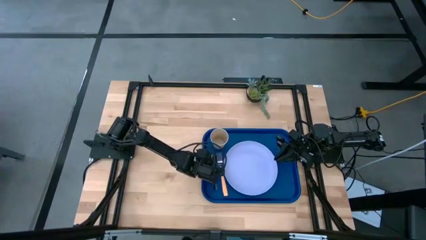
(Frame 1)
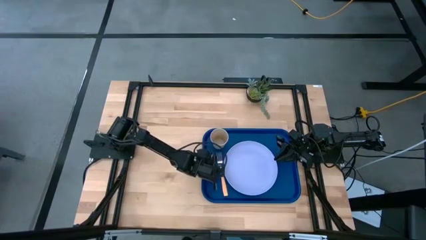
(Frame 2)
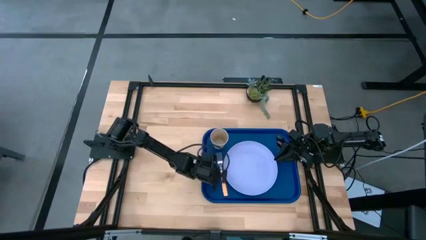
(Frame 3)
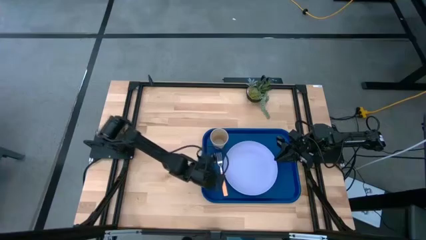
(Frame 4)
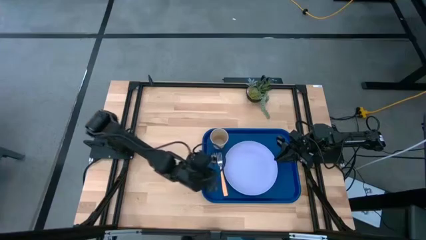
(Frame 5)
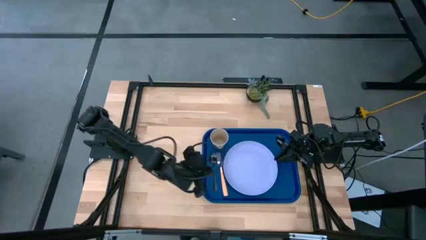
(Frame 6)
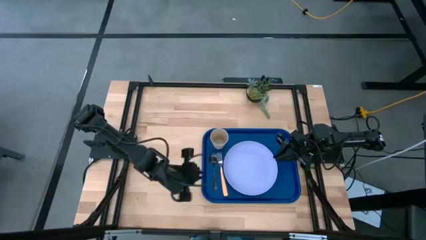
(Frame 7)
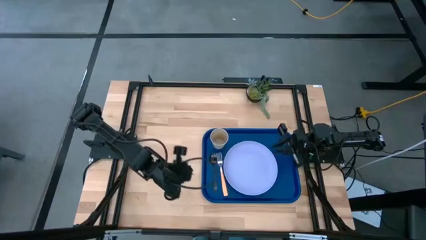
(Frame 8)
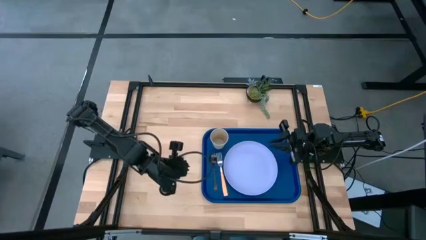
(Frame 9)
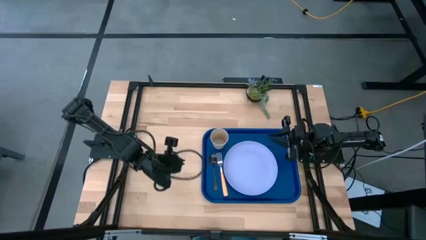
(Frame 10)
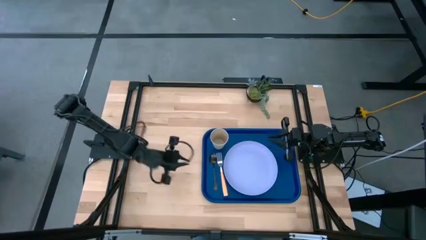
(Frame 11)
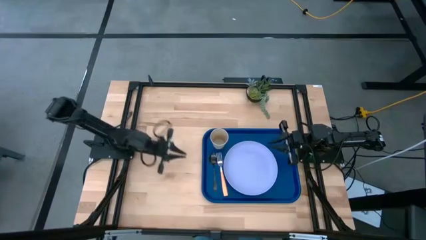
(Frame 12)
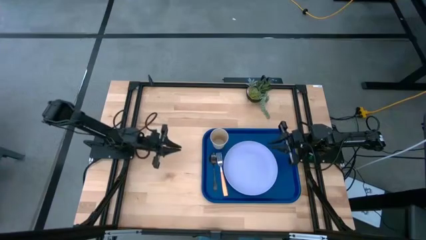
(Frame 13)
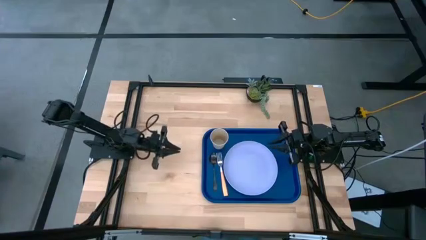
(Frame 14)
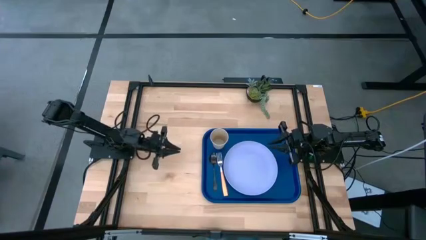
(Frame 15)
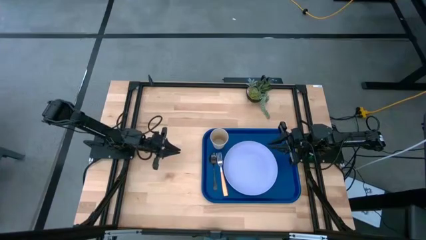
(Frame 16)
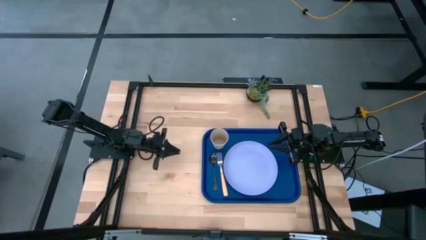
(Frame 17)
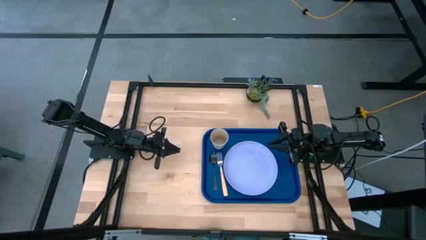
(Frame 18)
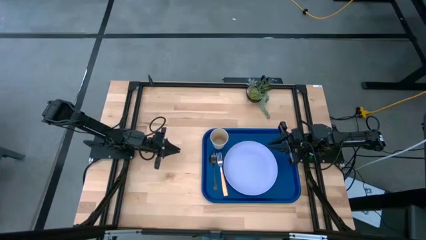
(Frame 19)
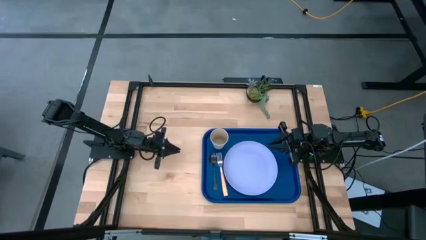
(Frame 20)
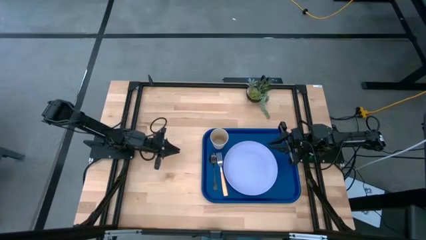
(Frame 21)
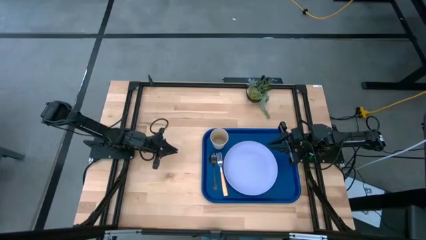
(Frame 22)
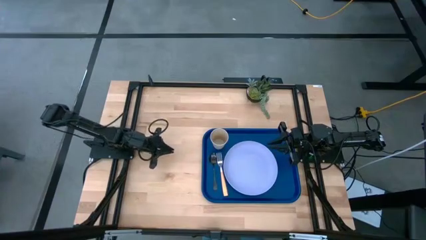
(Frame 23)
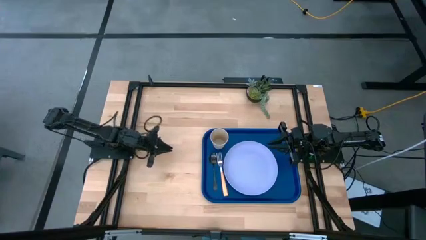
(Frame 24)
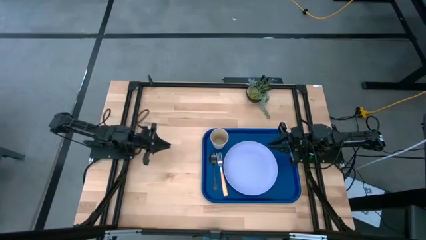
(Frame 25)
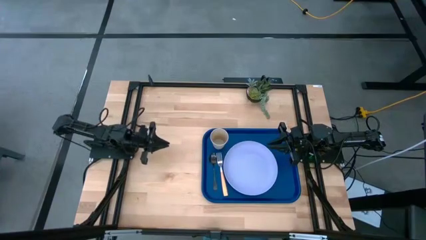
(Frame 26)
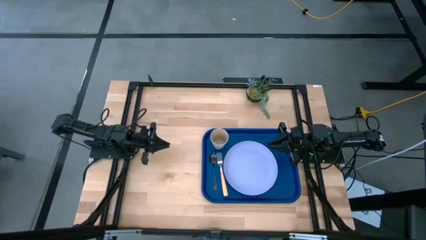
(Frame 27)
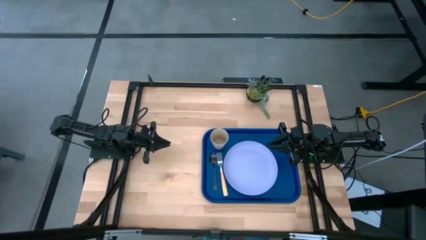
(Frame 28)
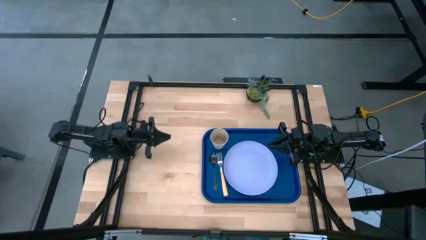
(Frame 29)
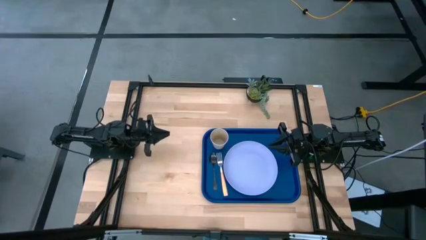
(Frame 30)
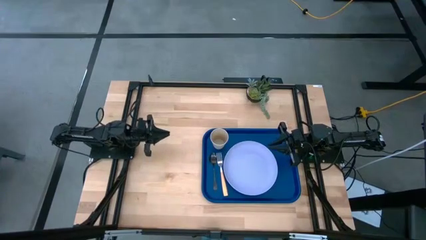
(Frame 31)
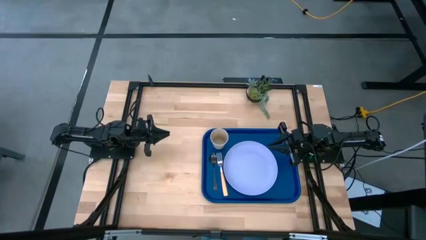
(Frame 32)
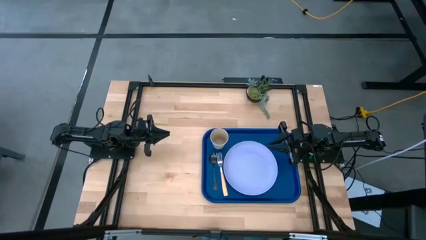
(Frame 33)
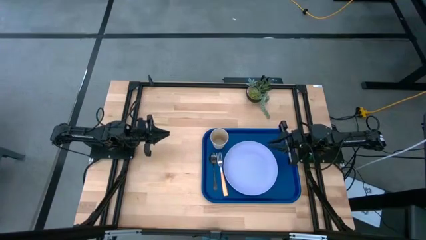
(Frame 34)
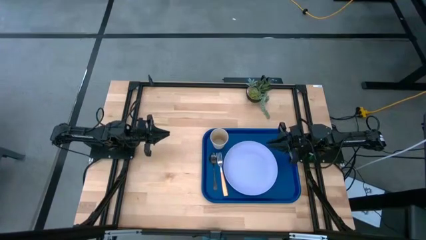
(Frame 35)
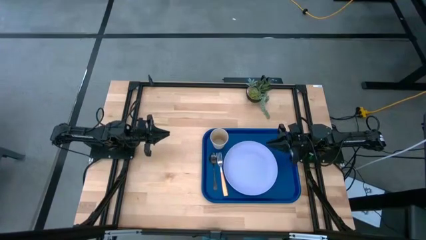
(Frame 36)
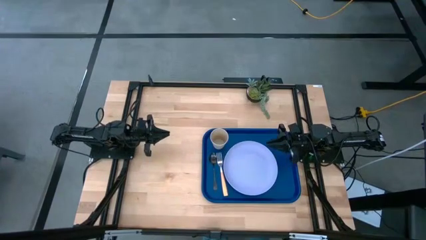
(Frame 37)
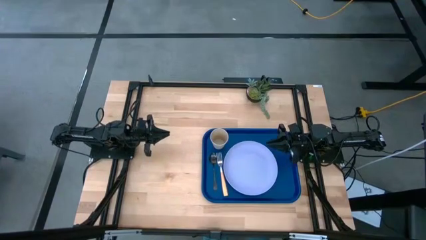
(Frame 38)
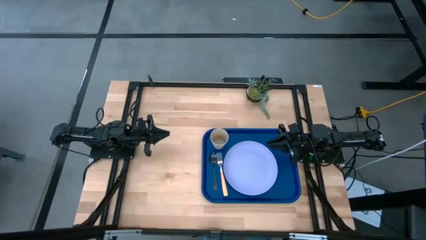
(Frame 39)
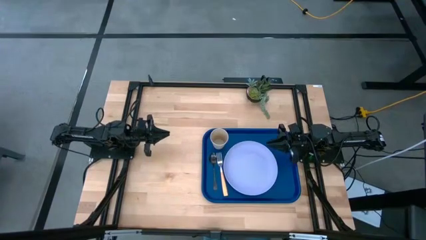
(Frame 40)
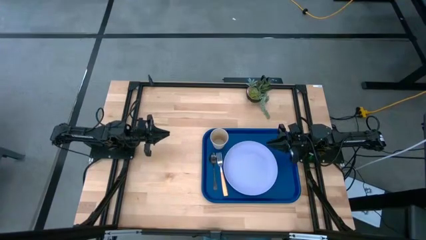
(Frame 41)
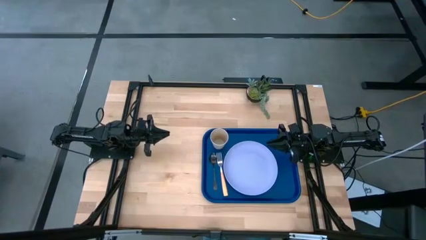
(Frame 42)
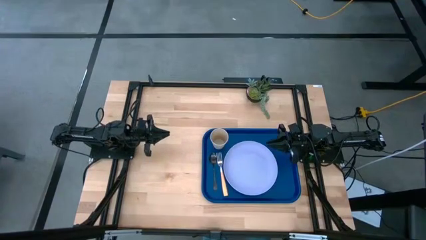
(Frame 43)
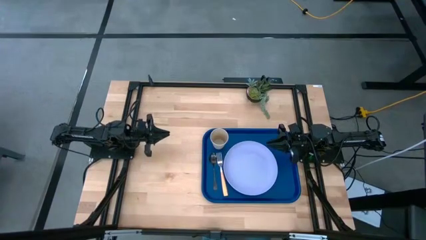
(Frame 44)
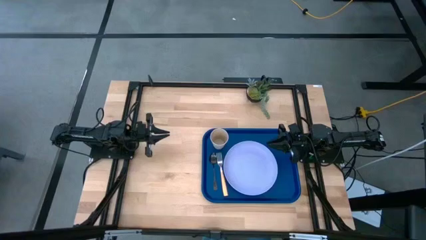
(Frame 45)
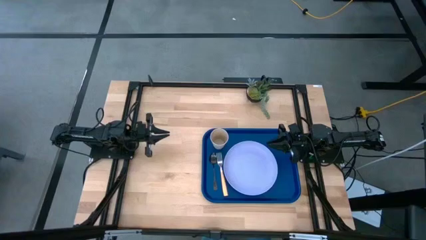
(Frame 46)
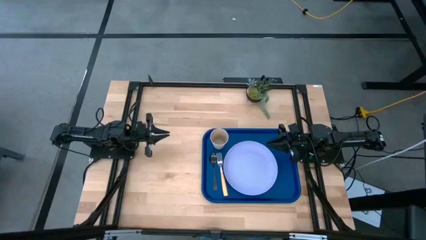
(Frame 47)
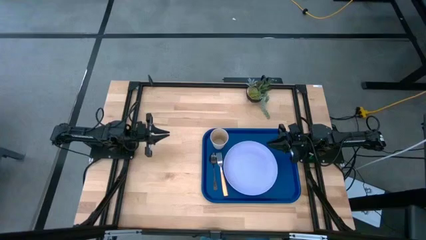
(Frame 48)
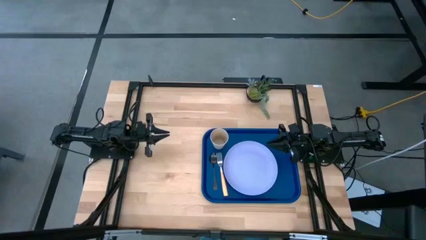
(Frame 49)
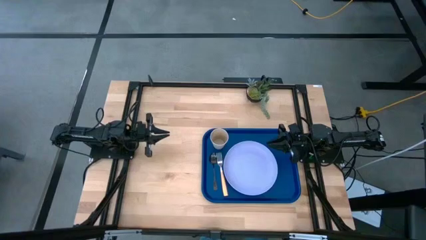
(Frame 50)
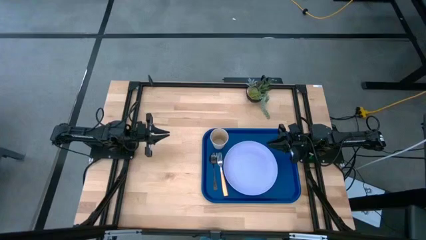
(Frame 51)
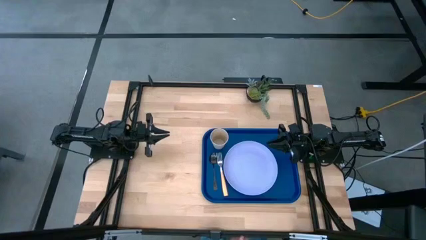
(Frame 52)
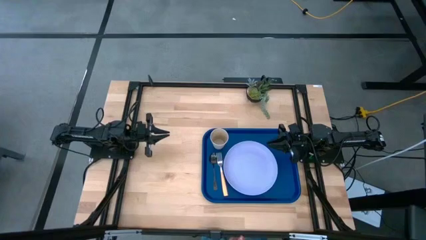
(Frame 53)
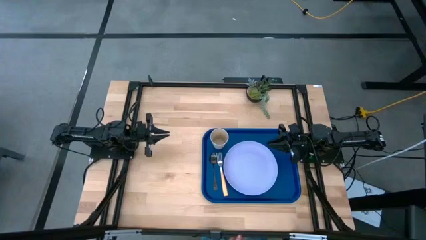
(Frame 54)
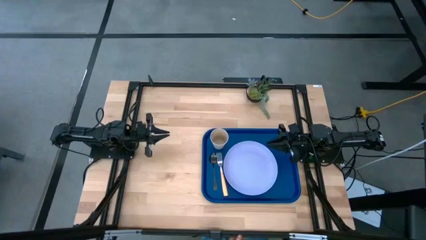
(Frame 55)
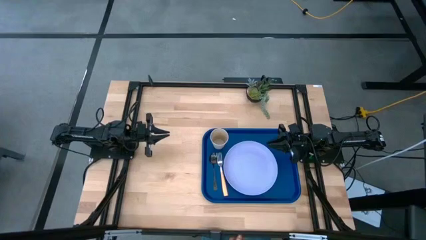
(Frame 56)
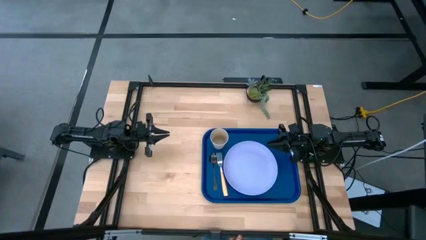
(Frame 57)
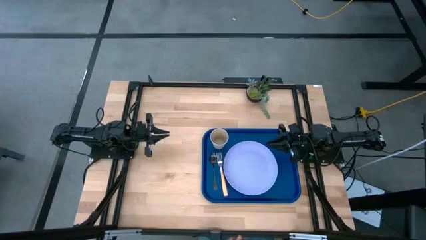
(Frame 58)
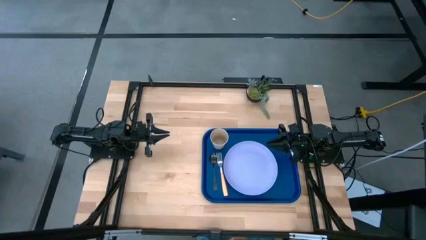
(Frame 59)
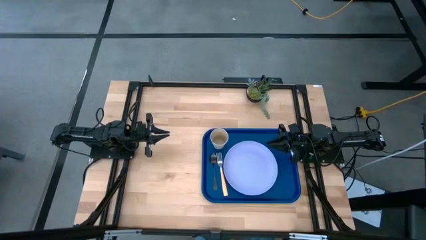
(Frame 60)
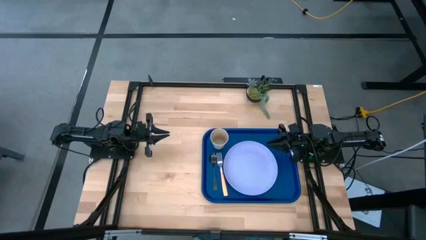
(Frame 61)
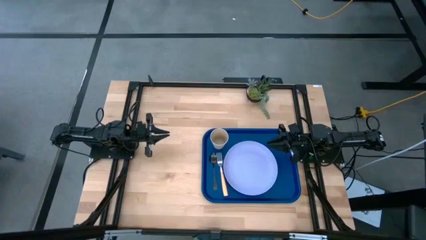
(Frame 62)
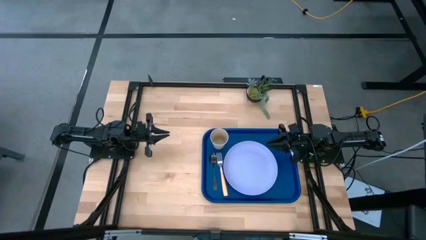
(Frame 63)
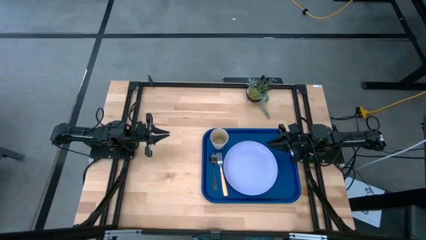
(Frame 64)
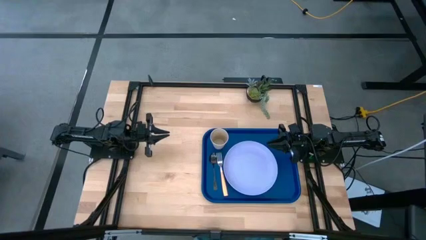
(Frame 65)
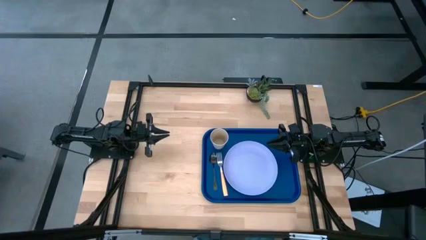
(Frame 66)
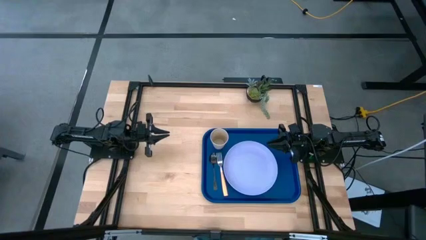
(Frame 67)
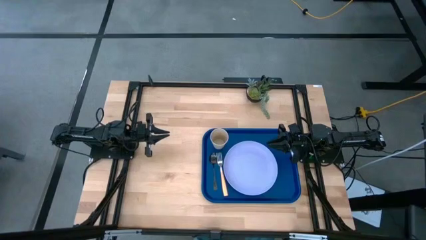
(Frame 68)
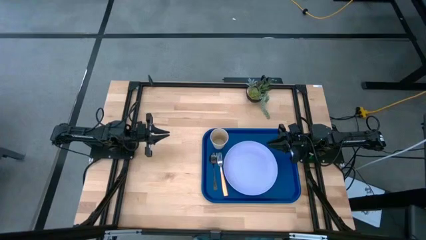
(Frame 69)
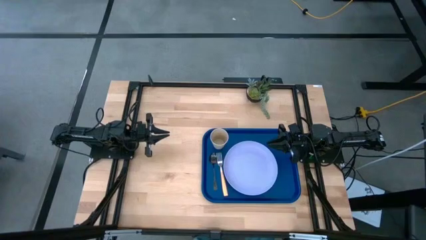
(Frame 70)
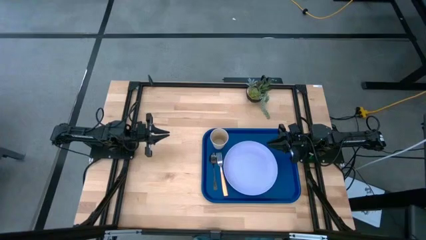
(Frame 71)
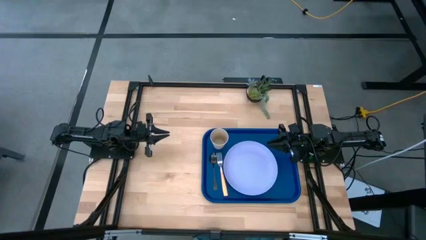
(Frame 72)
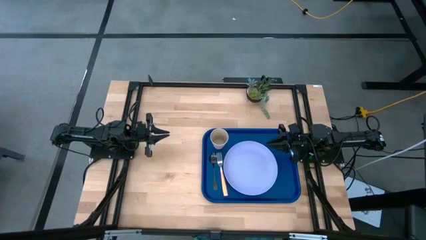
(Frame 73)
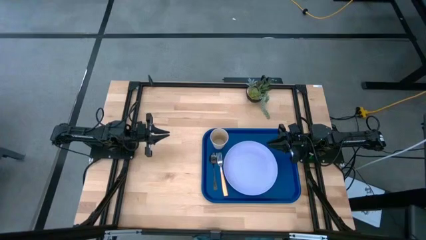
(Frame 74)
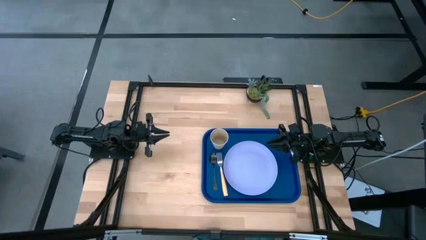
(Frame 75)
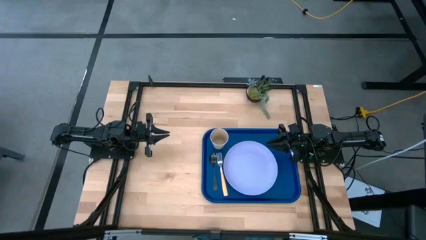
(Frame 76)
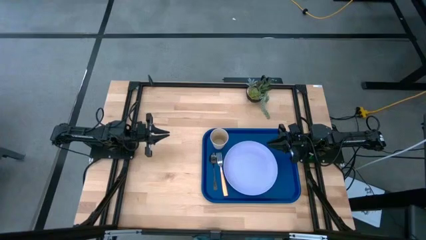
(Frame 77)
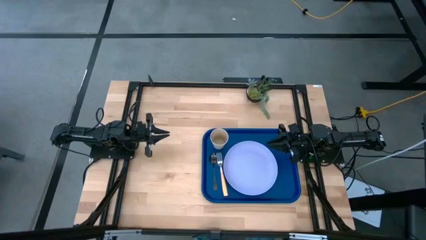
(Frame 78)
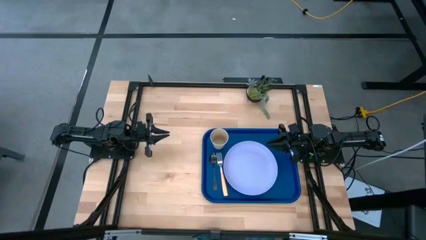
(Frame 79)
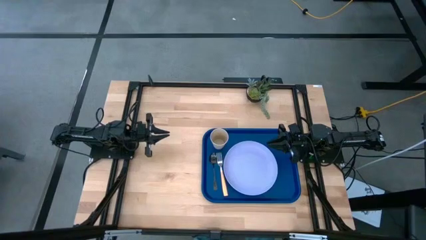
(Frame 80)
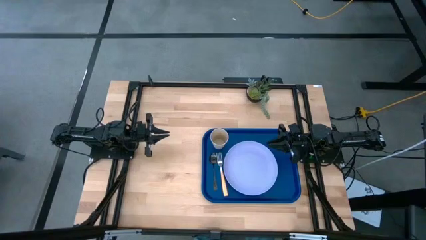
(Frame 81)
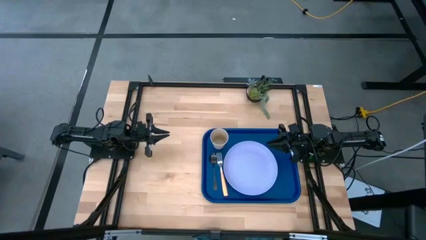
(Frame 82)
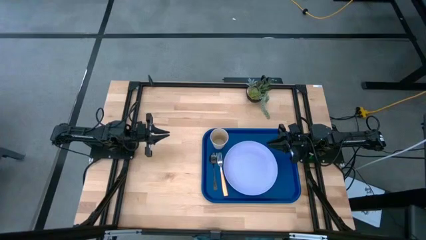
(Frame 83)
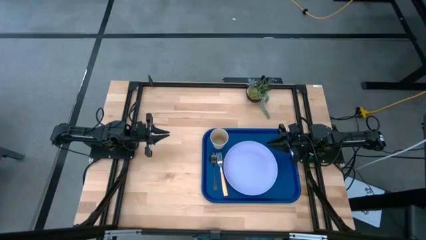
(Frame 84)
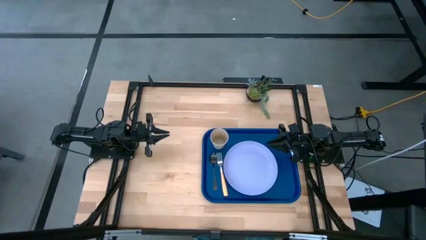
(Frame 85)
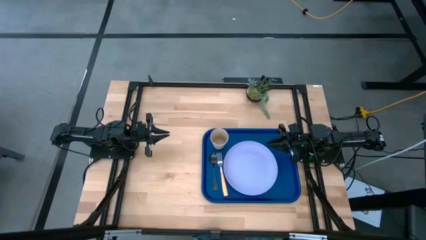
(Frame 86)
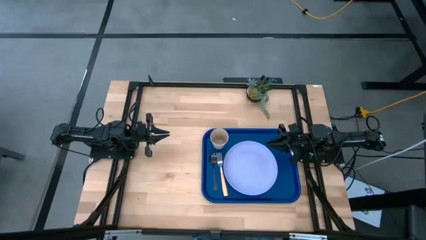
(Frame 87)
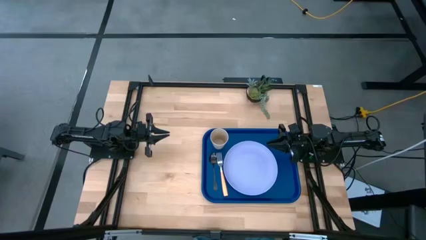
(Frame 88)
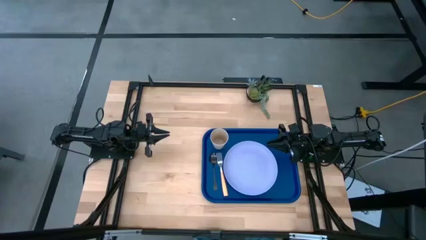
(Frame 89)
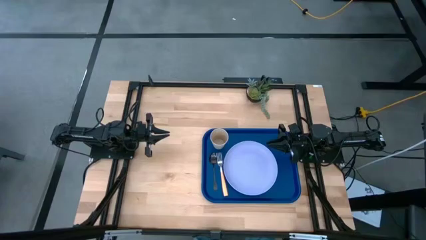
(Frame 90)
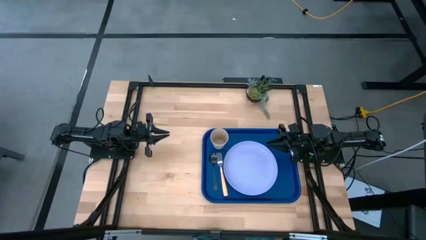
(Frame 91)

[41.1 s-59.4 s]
Task: Pick and place plate/cup/fork/spoon on tray
Return to Home Position
